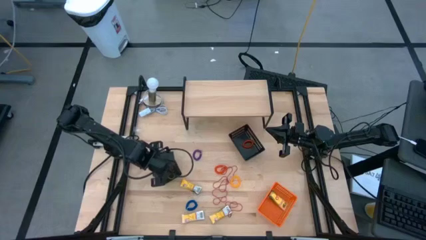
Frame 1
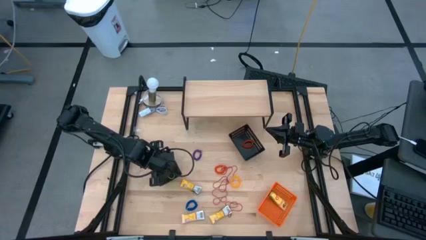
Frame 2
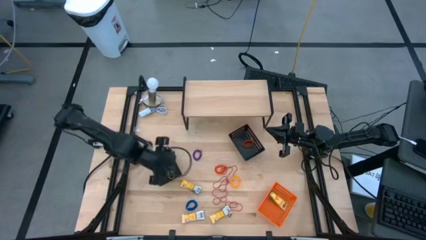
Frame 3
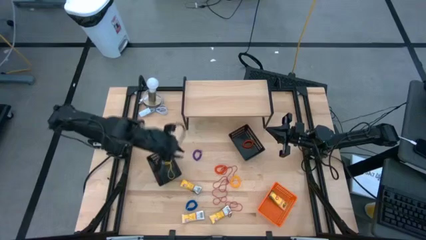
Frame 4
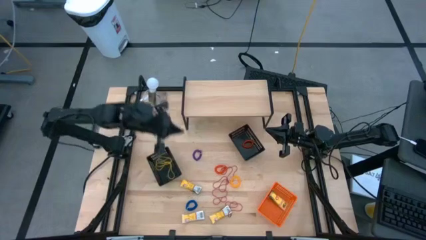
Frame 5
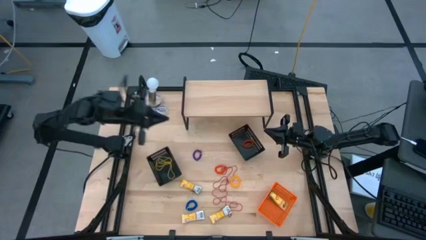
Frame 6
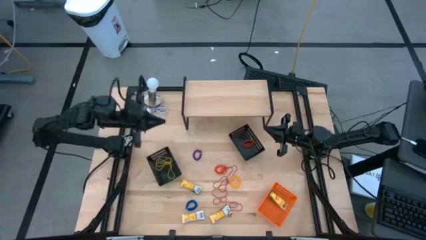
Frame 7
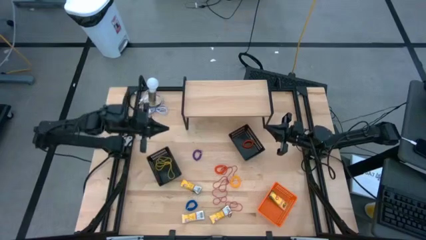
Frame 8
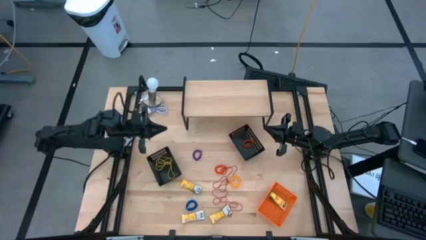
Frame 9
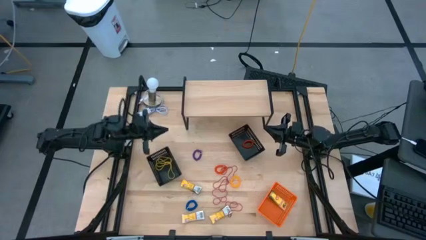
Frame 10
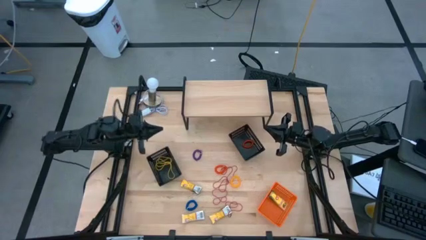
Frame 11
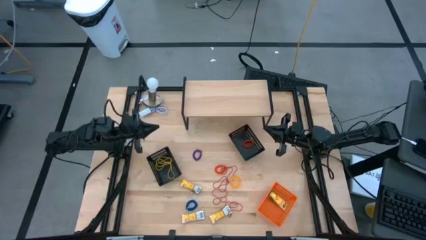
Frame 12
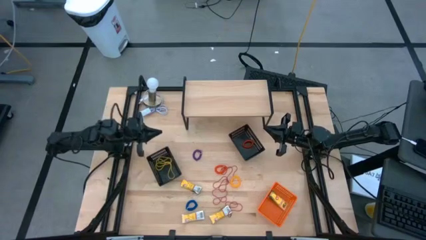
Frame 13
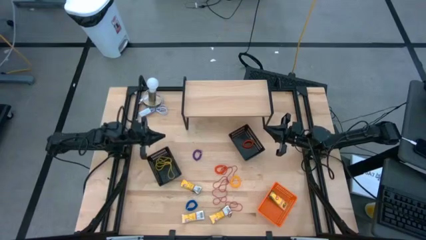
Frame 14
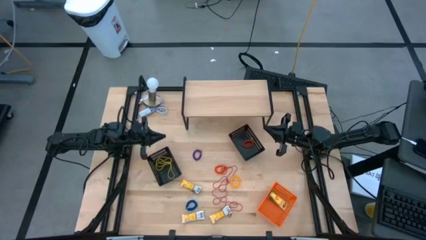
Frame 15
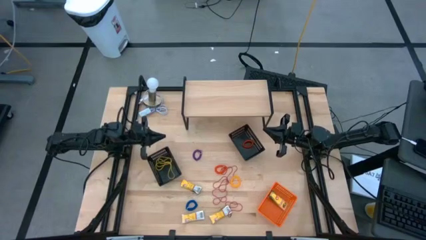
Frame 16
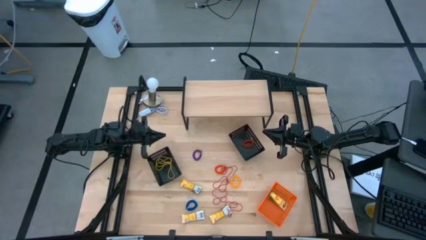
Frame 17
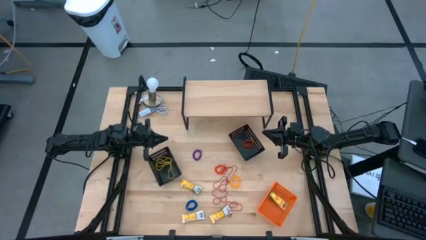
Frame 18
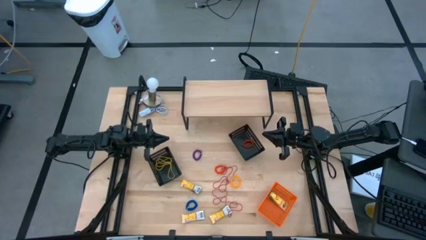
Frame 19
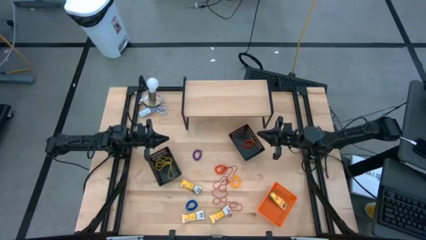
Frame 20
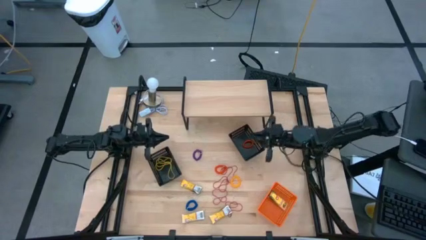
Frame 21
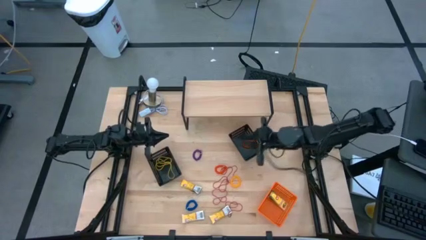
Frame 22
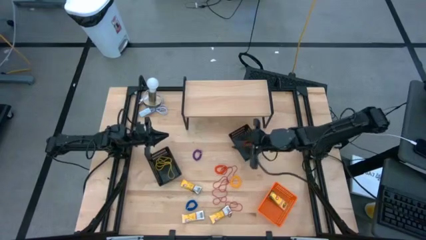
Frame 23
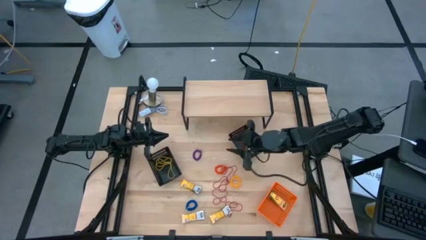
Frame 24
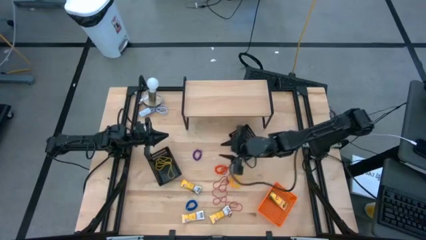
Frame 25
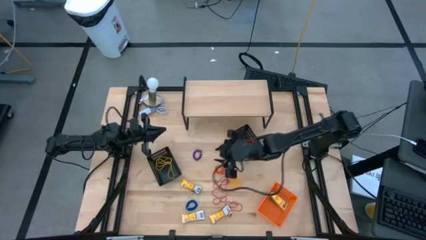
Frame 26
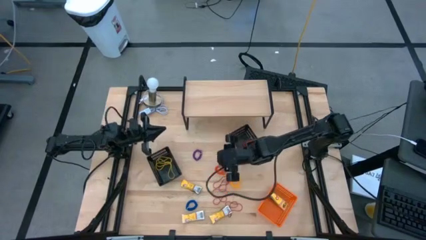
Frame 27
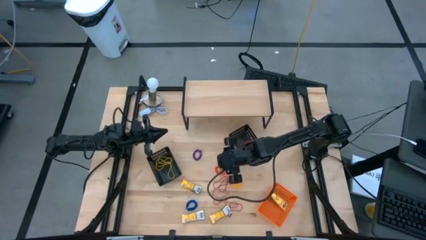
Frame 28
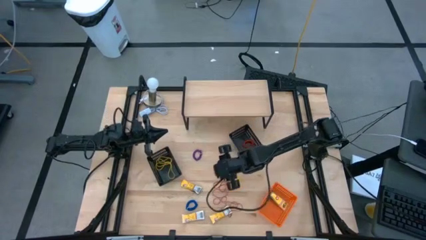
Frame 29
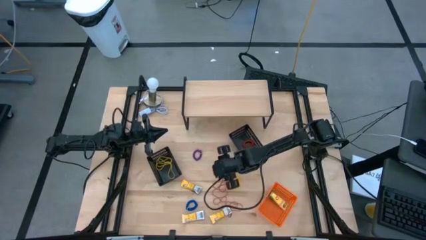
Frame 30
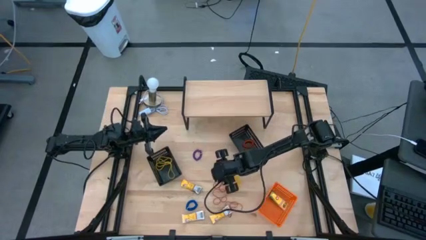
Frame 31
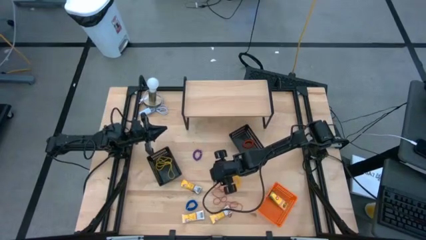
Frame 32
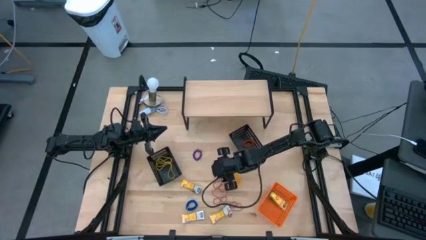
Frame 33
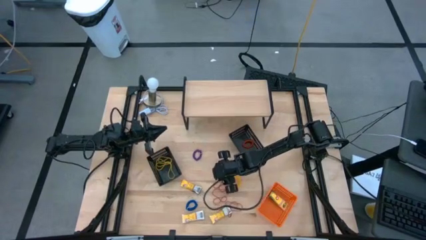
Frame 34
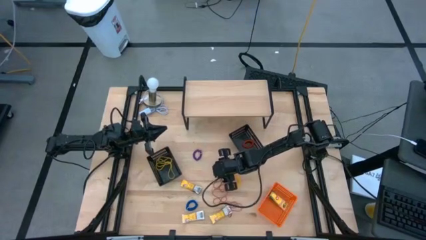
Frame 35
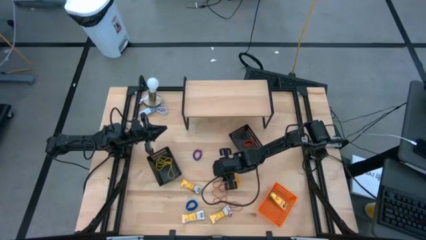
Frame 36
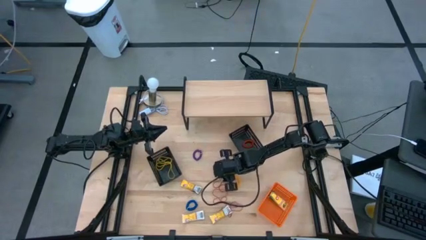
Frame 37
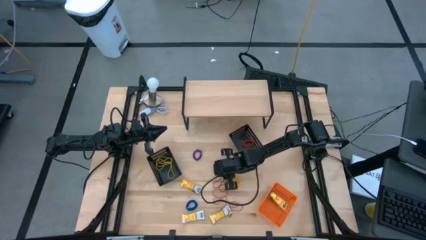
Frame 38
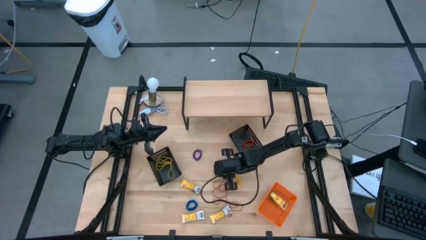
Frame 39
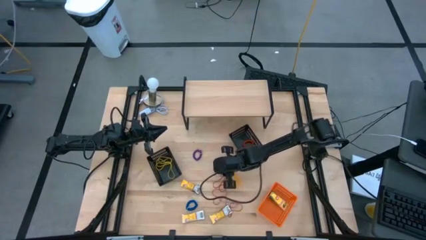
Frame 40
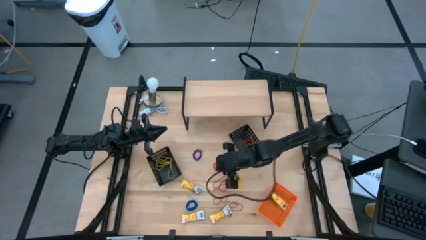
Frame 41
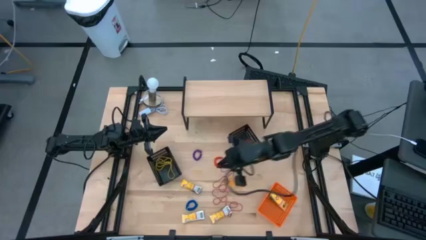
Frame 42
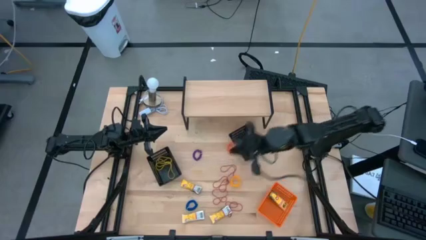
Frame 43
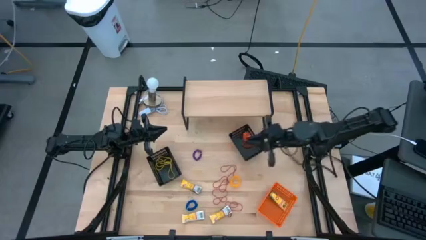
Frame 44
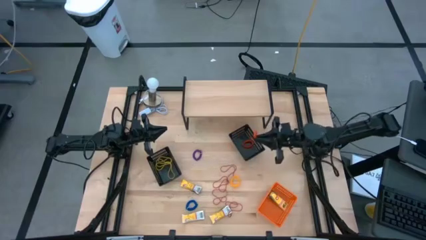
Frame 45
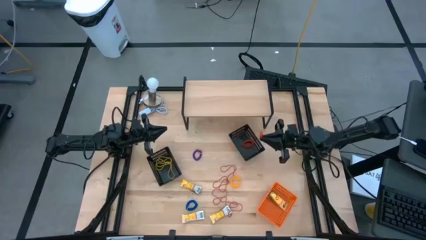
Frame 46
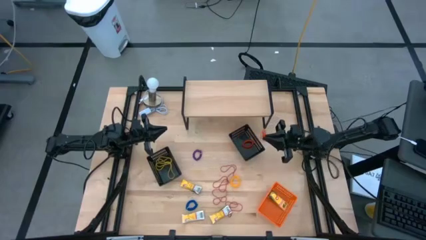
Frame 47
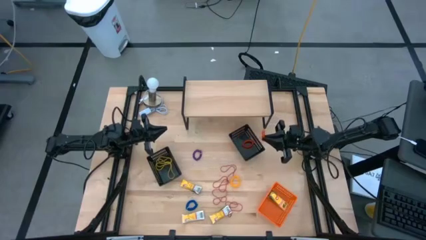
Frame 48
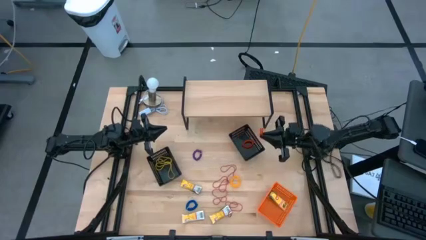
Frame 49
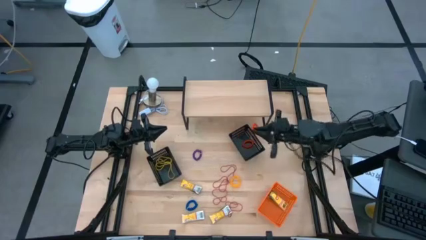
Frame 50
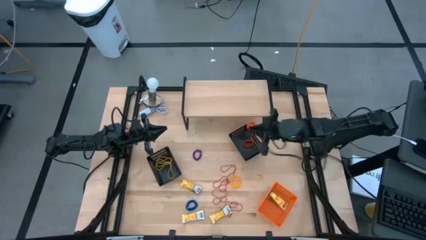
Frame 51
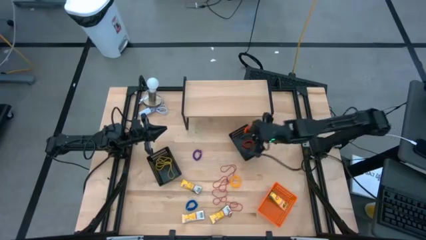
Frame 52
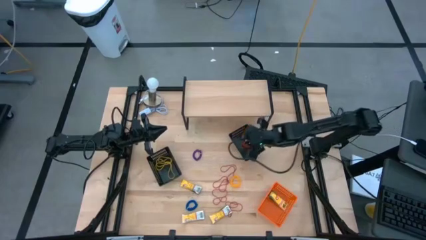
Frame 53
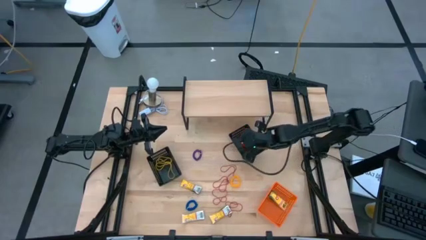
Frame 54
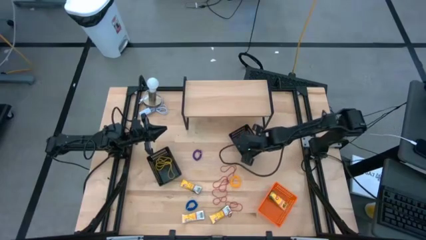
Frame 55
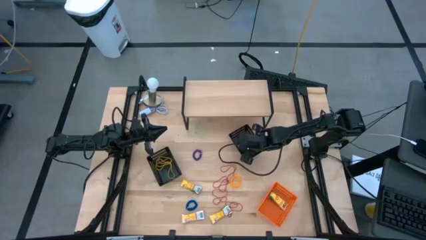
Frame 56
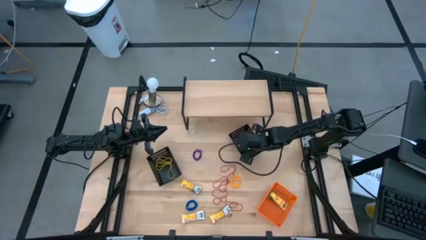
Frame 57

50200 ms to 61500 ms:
Task: Pick & Place Office Desk Supplies
Put the orange spring keychain into the right black bin
